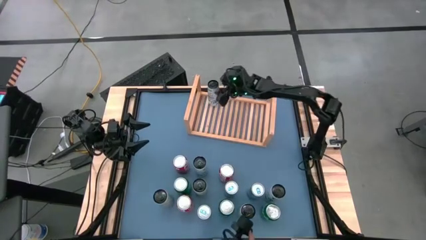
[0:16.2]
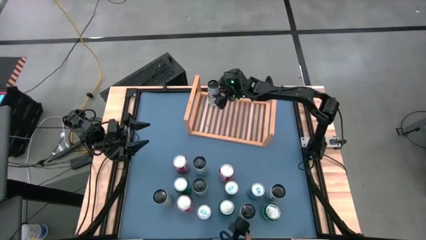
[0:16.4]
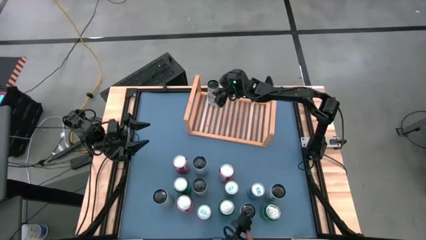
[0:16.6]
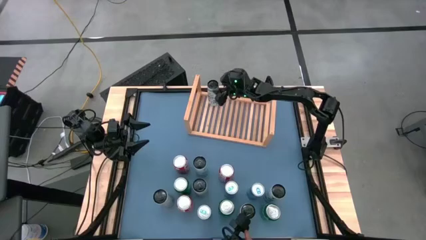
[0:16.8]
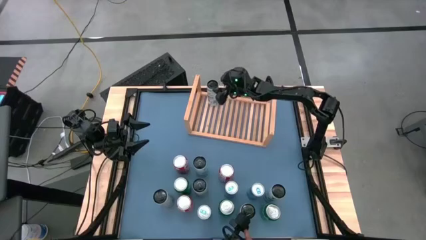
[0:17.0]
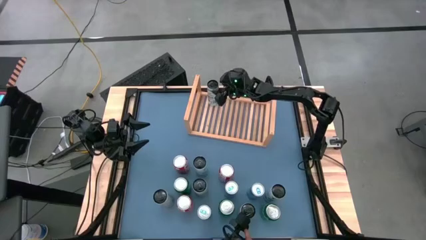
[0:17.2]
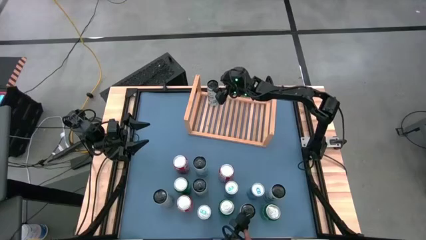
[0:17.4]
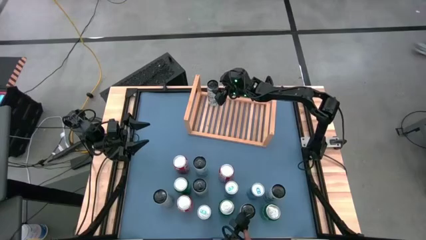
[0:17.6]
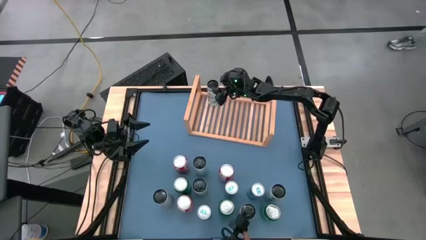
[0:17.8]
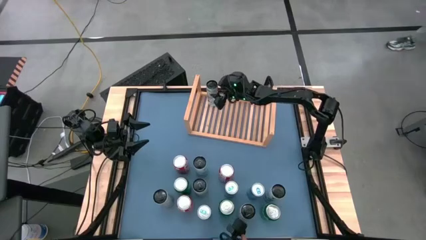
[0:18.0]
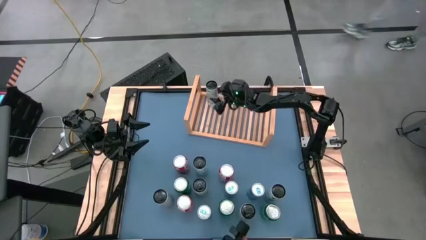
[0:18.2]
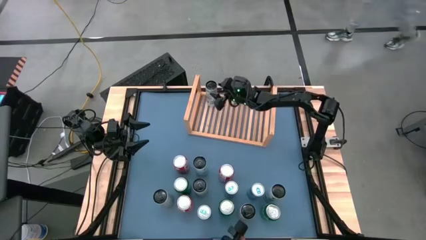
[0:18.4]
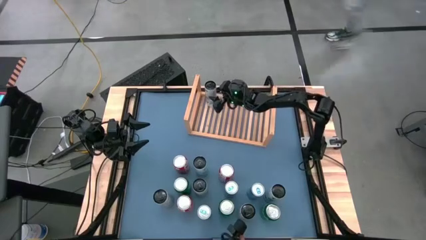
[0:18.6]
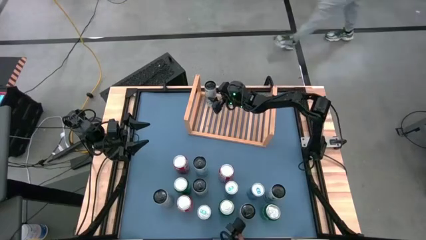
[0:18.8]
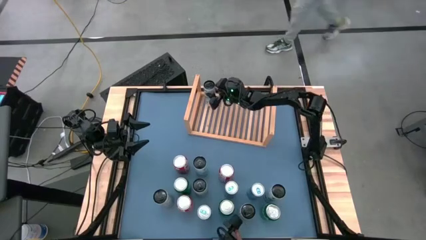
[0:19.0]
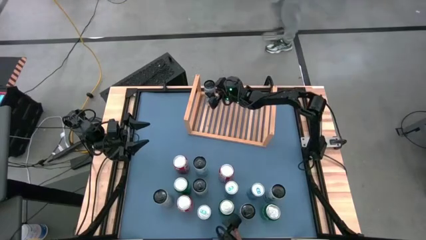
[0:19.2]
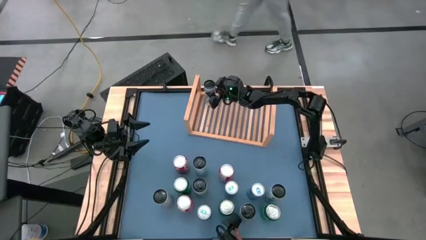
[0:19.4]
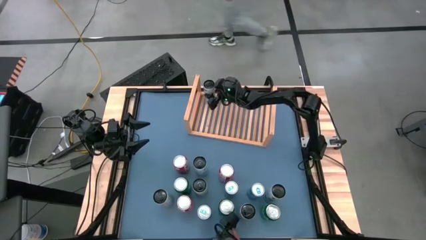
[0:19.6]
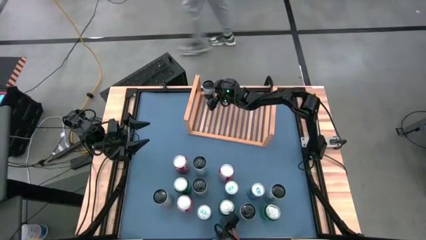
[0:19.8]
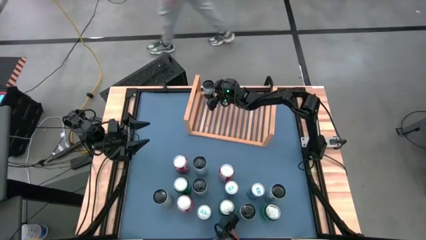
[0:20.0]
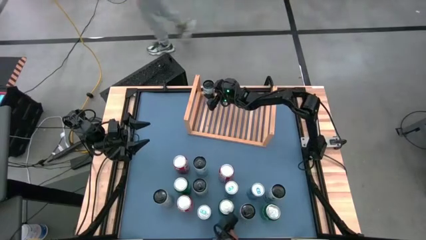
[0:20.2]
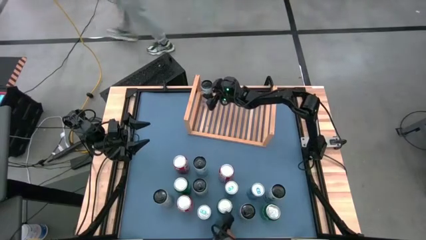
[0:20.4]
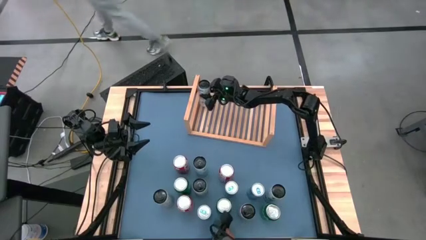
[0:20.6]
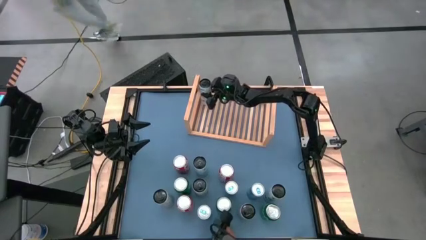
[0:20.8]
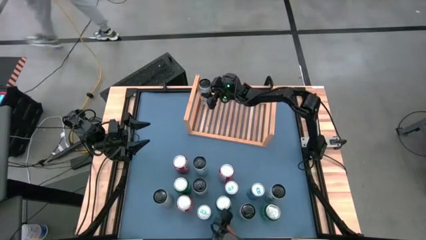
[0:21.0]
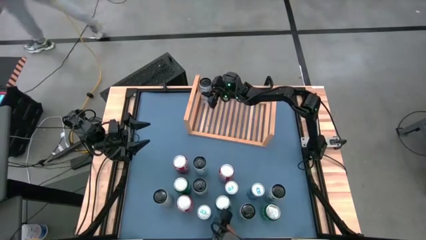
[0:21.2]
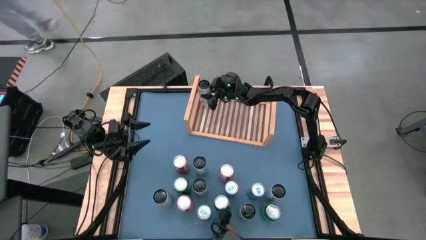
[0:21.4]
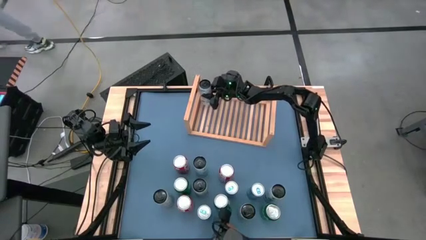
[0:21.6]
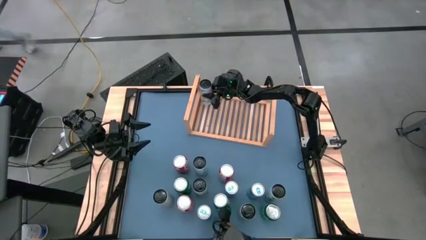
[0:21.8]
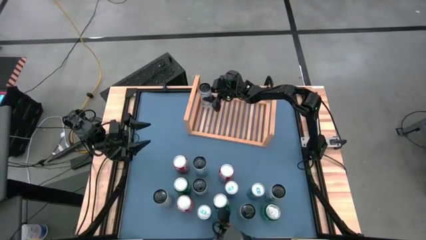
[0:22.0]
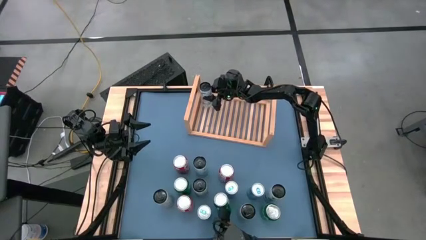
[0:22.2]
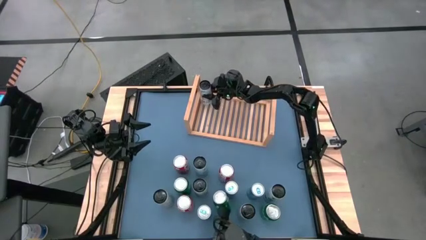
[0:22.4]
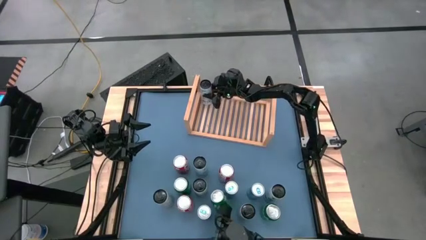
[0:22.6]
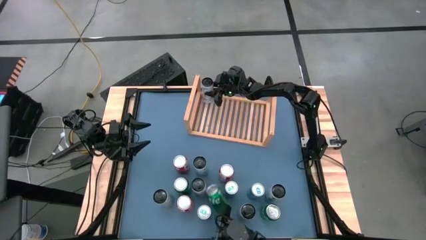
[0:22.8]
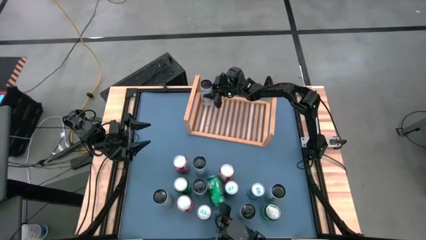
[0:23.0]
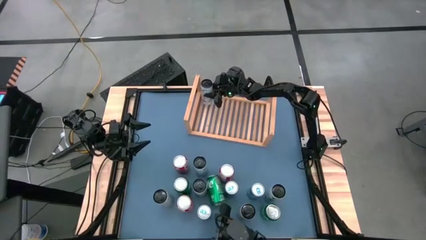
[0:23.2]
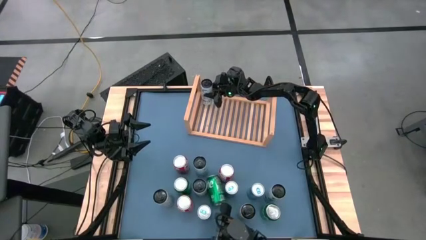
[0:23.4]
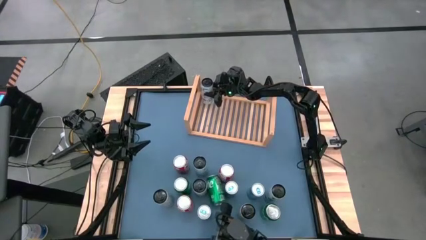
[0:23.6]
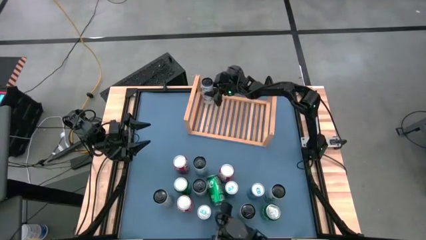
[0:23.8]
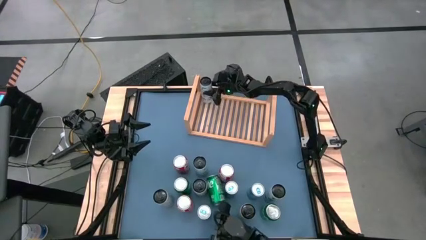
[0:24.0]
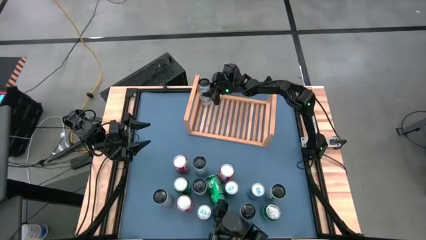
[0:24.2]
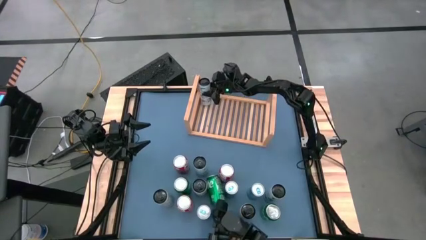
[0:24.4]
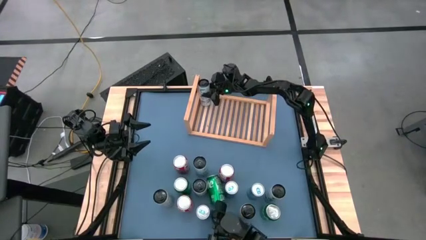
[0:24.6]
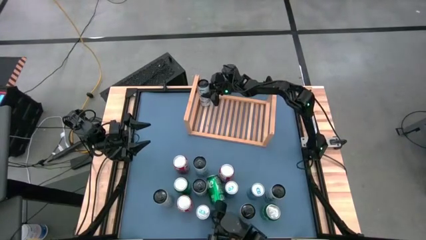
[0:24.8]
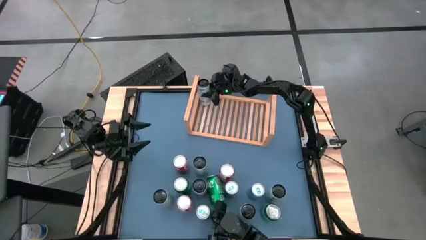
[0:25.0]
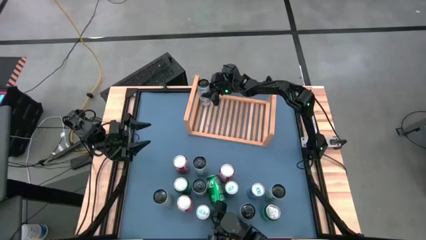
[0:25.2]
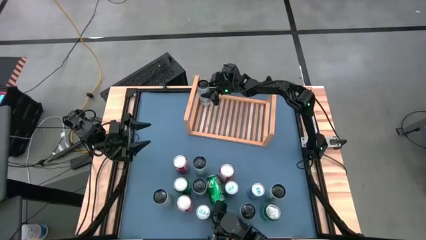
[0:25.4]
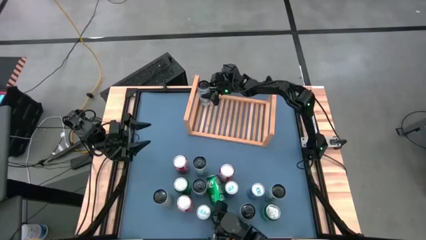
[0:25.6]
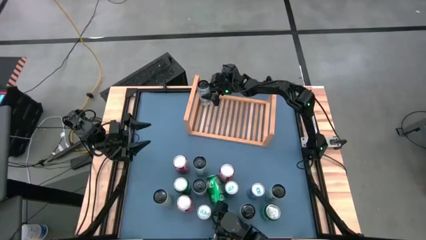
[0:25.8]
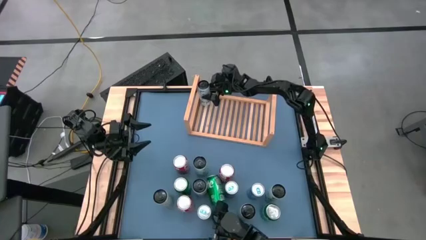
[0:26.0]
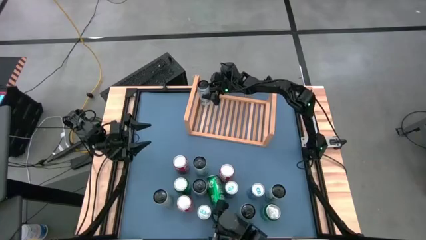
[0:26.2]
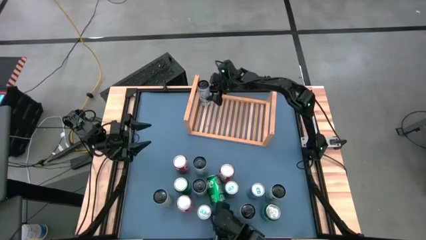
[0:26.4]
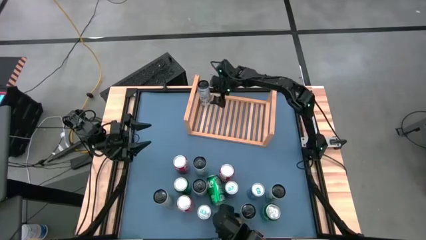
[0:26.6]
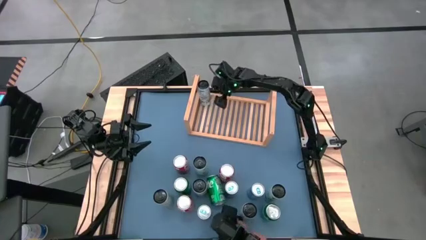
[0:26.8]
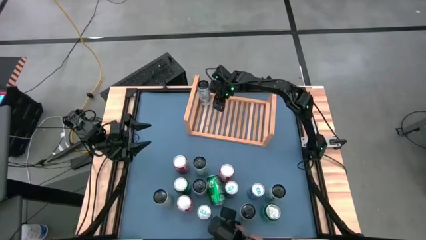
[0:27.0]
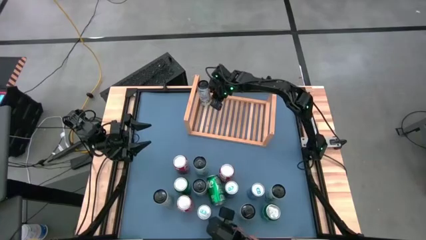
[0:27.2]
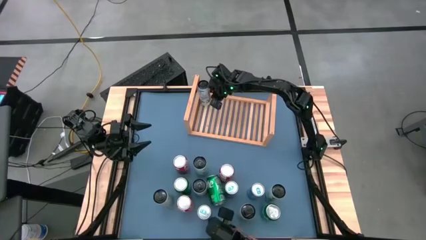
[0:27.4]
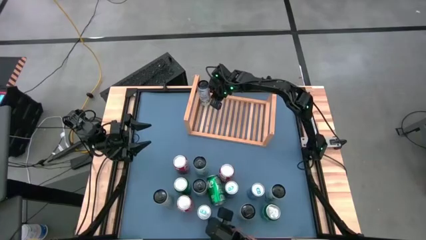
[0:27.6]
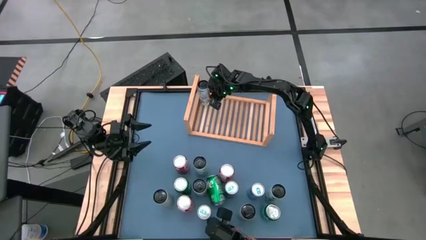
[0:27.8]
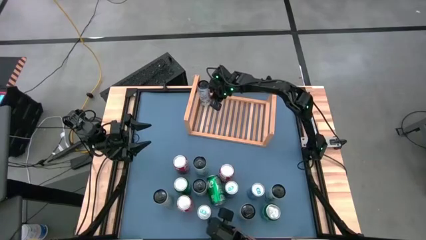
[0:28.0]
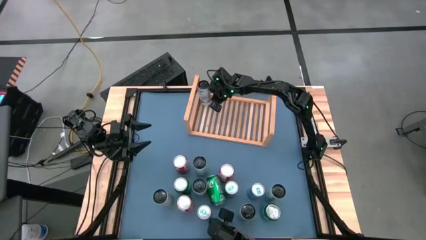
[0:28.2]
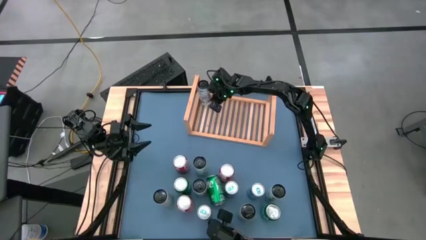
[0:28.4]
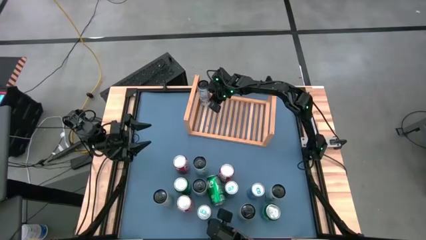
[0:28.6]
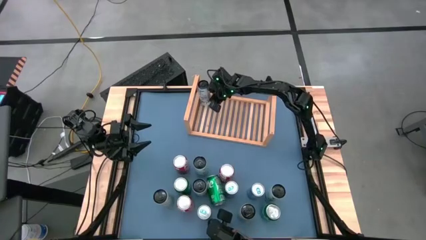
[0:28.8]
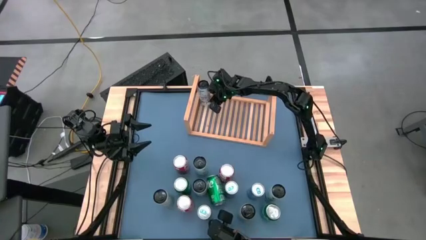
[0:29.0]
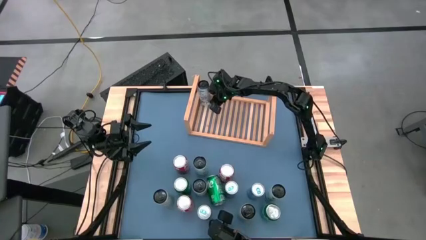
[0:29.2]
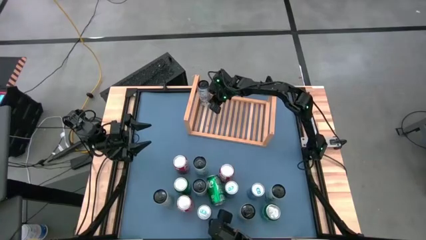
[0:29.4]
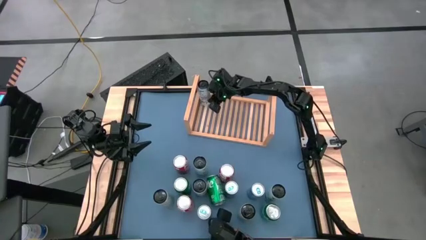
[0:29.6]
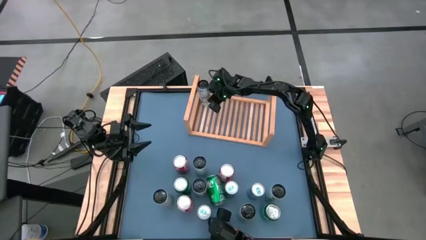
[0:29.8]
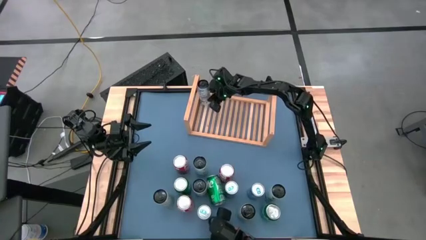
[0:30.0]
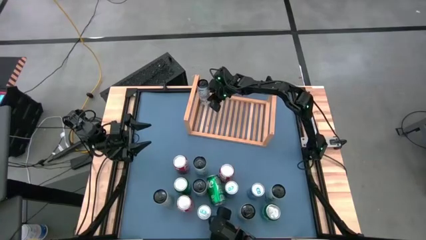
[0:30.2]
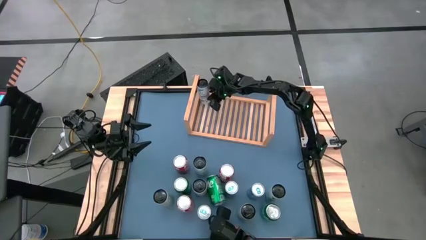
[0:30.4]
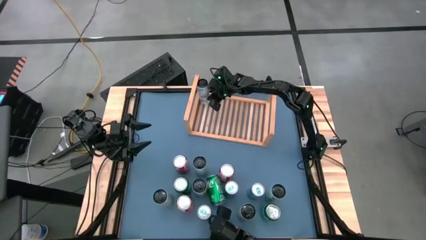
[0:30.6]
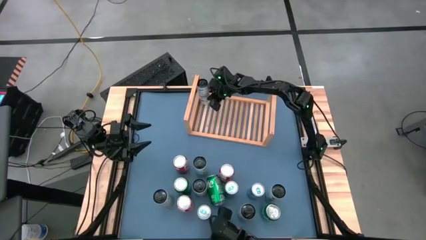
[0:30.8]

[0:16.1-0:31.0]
Task: Place canned beverage on shelf
Put the white blue soda can on the shelf
